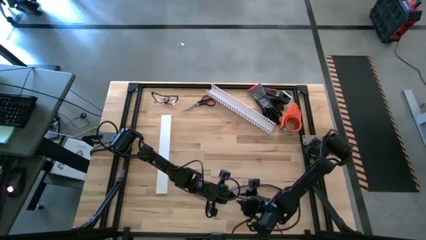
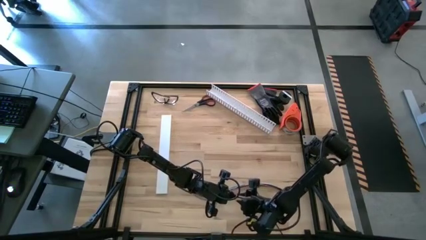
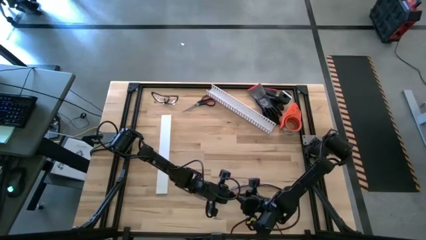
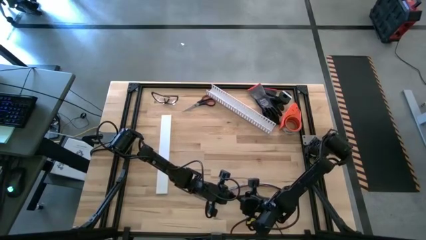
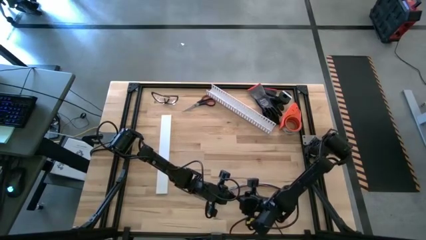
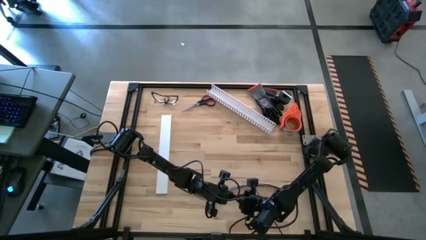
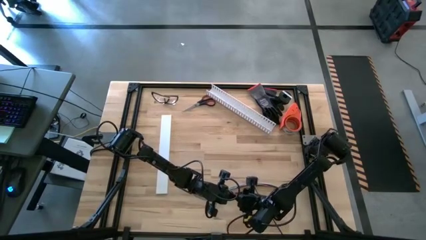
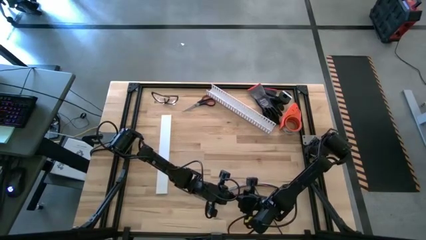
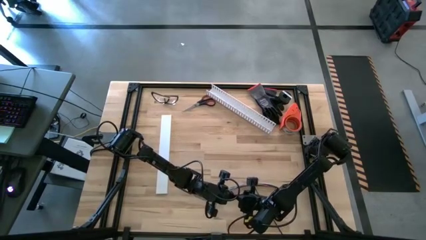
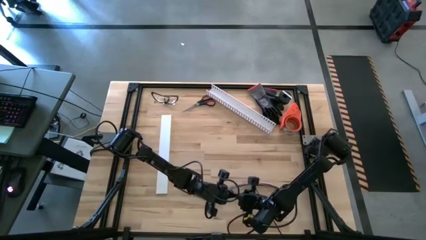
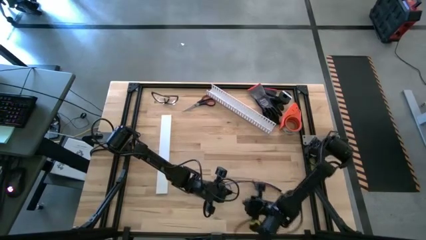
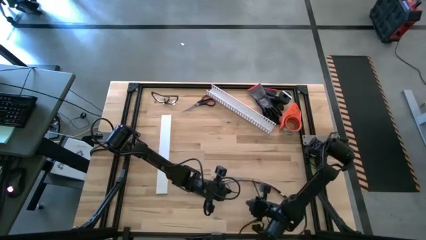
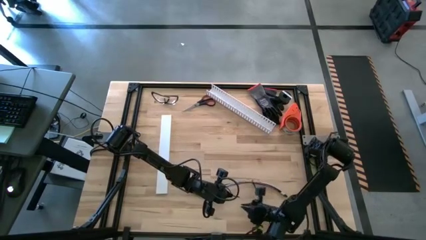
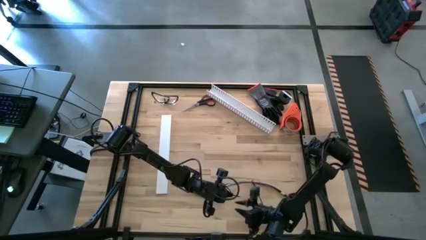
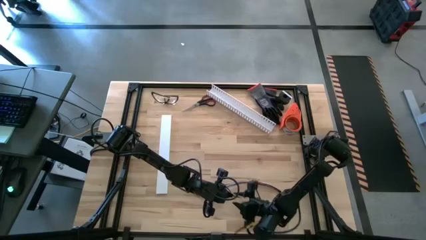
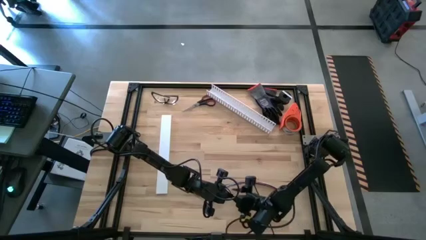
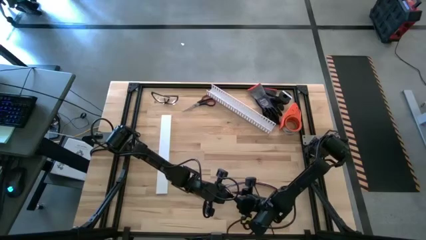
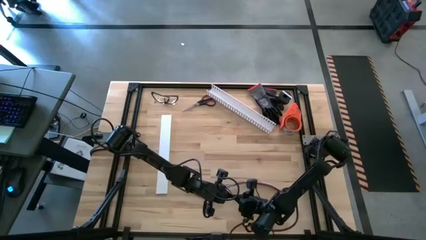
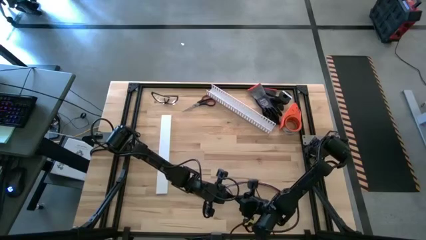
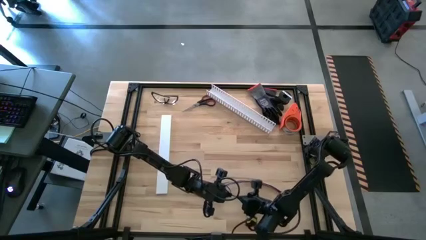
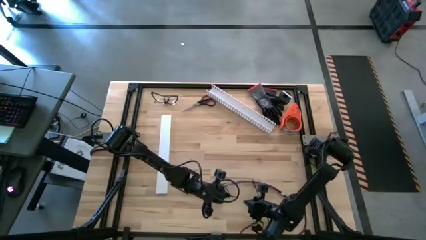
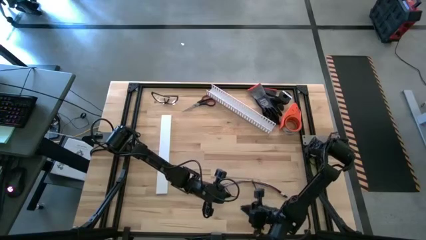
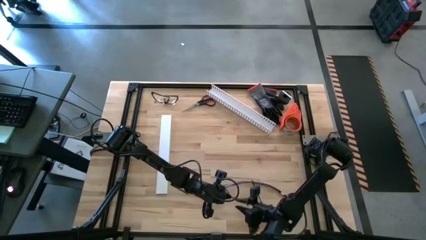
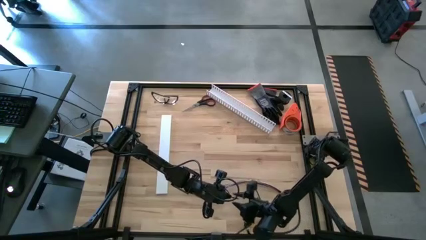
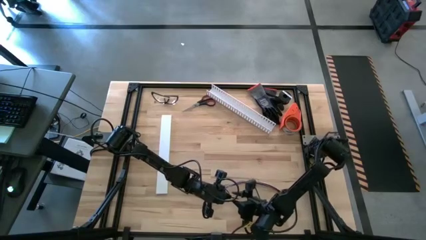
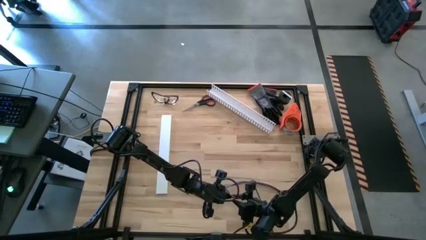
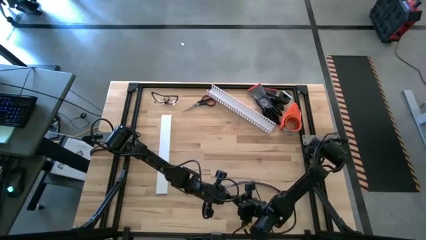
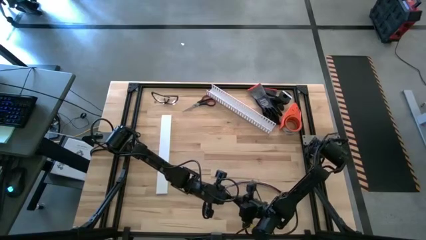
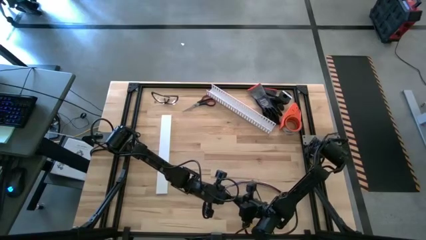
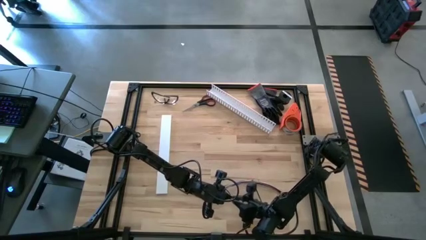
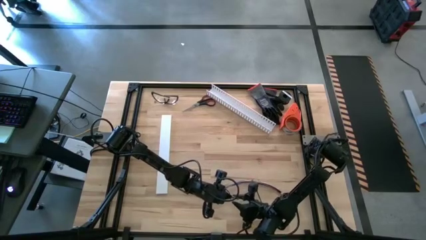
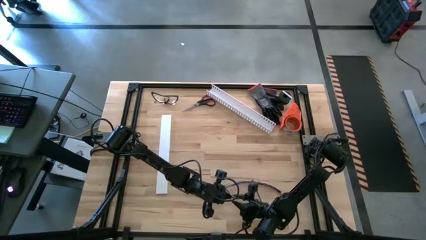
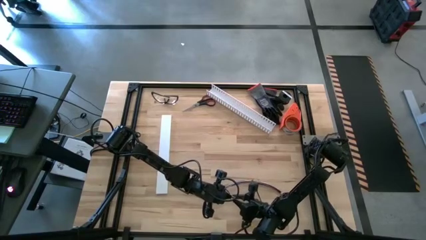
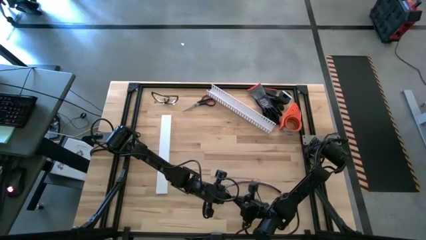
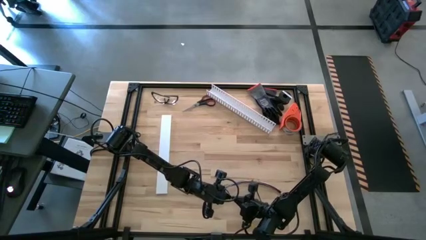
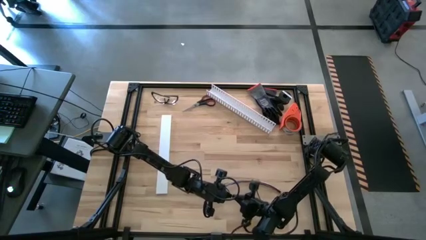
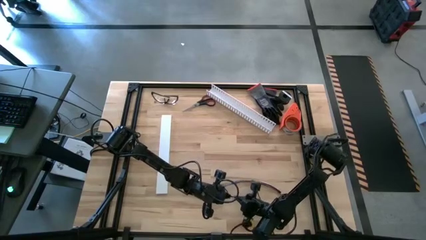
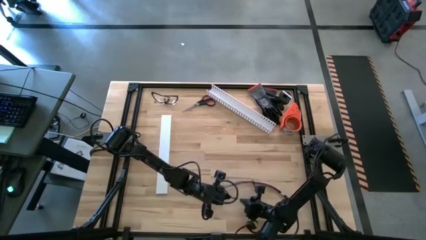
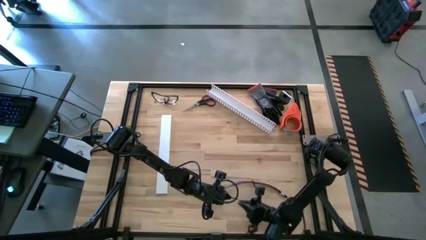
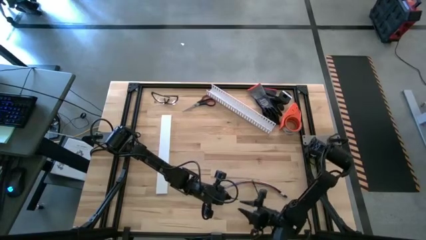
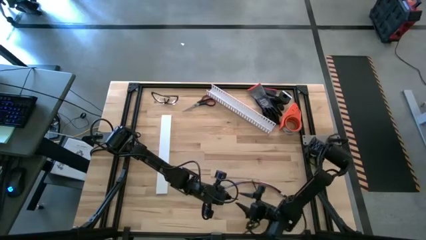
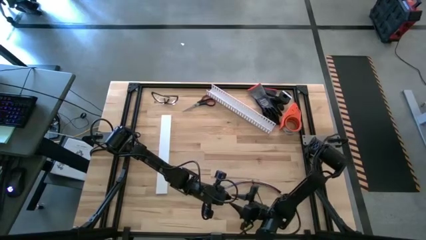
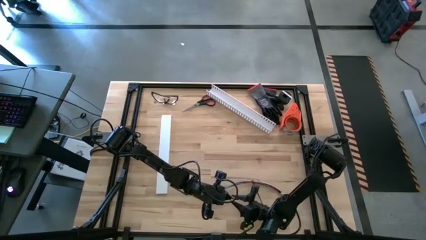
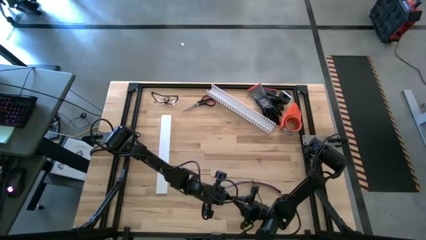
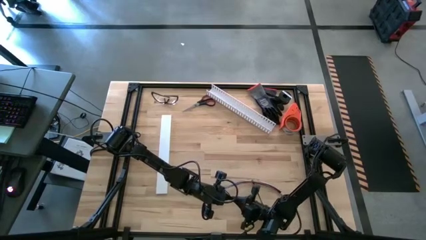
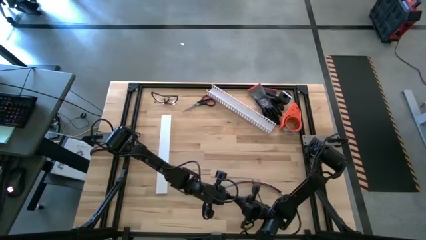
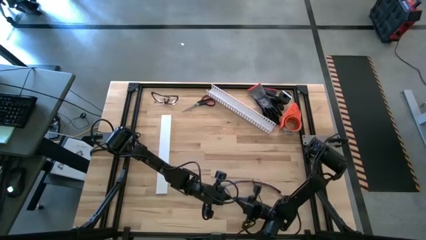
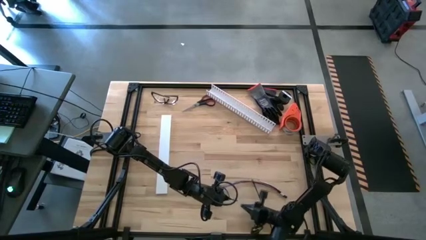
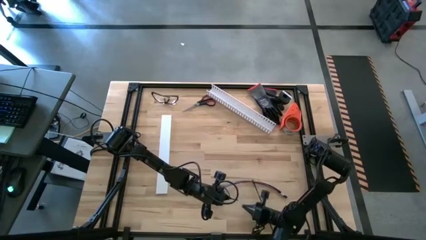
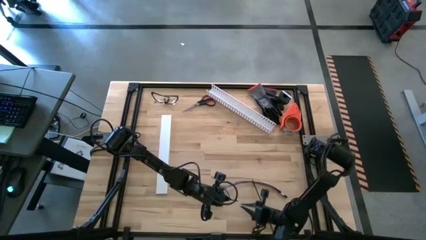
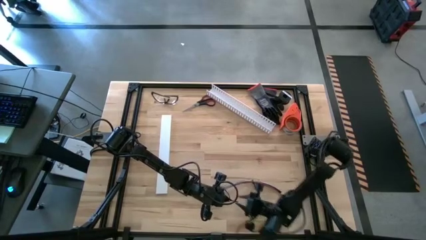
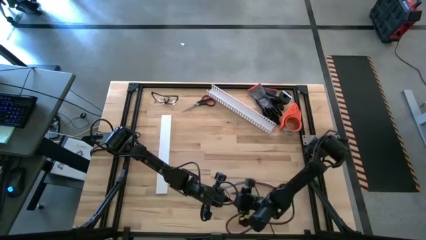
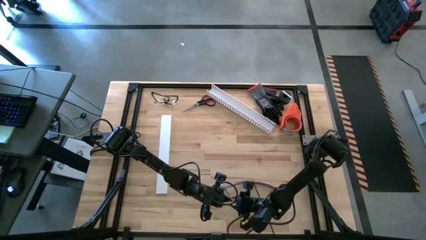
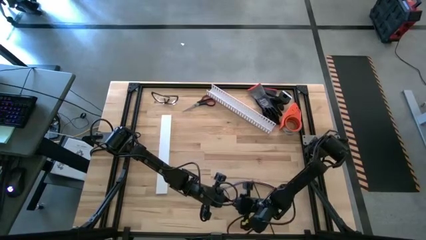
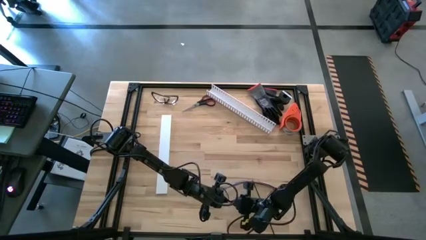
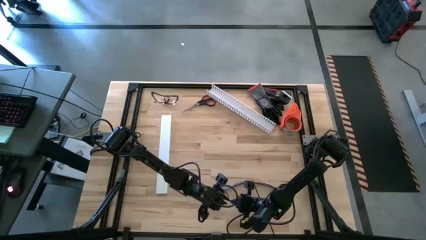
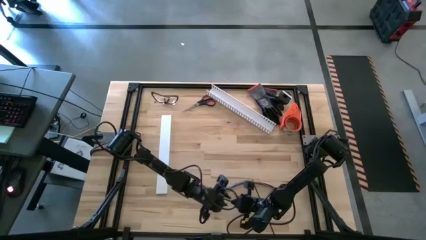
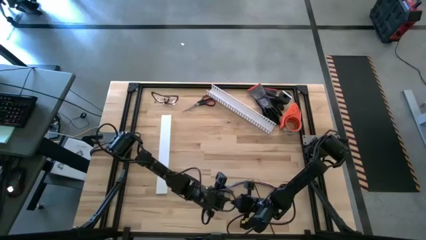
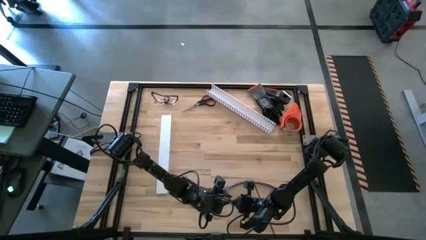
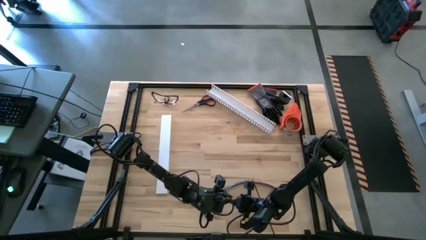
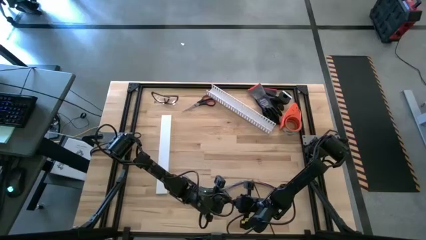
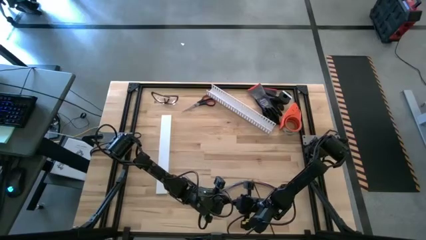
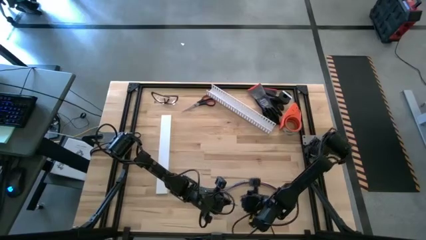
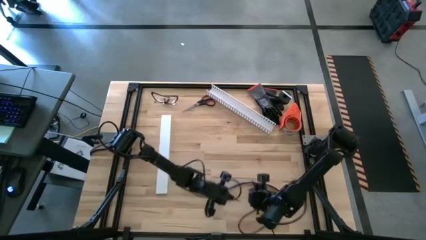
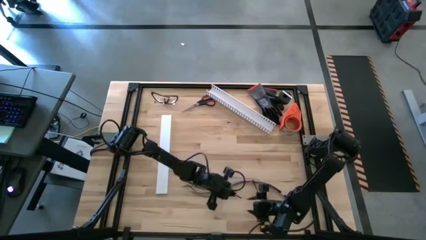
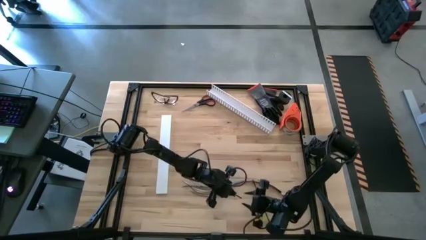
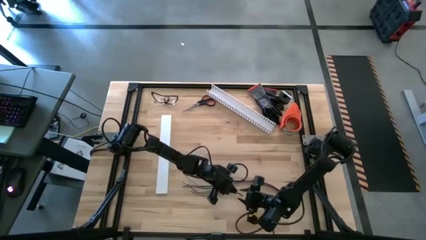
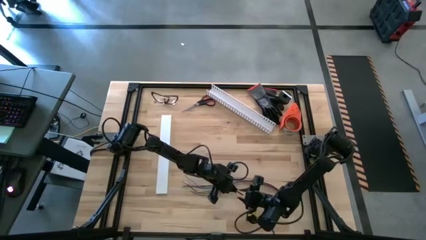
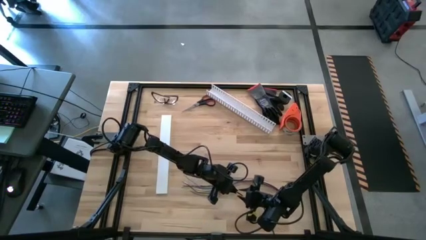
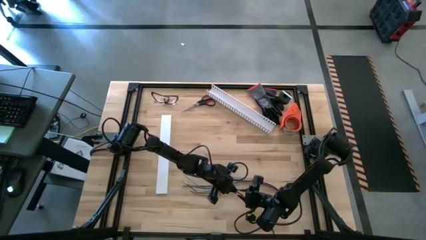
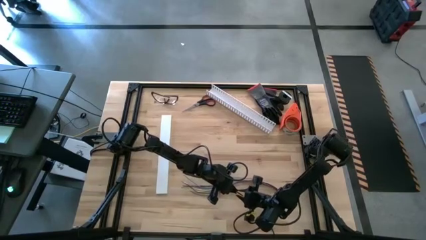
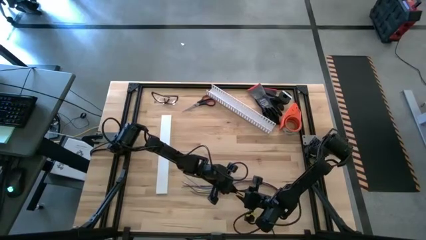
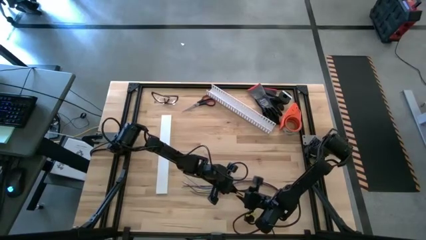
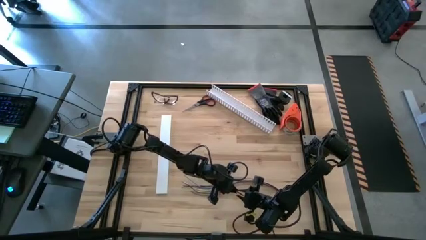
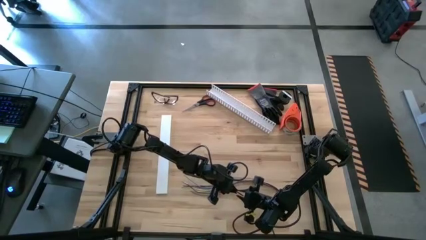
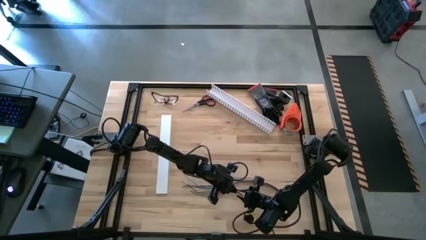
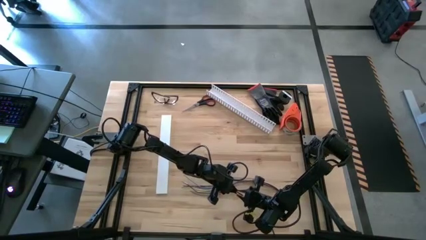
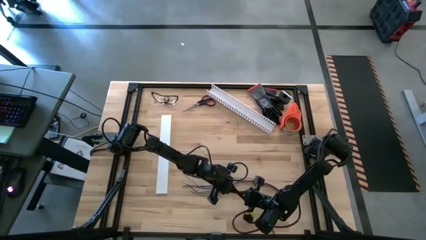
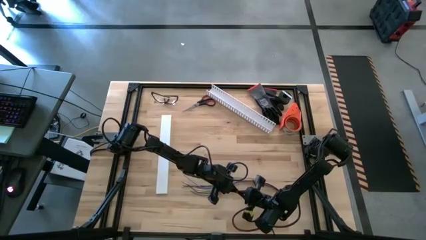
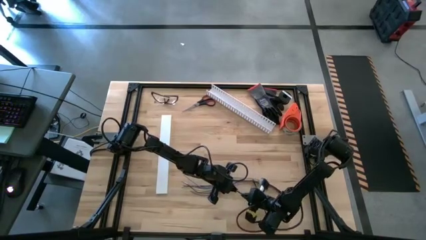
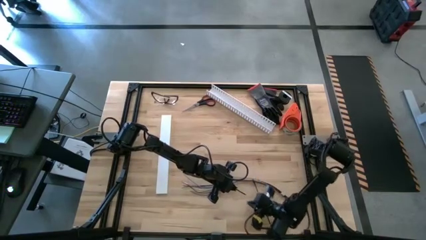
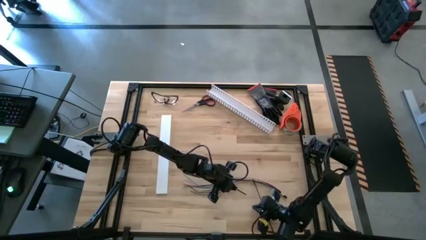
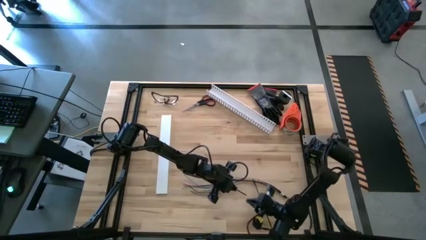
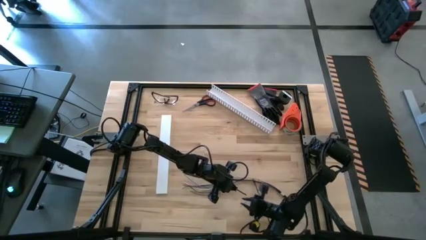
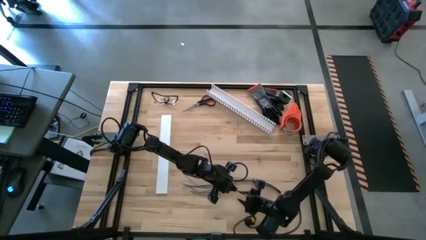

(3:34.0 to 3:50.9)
Task: Ziptie cables
Wrap the black zip tie on the cable wires
